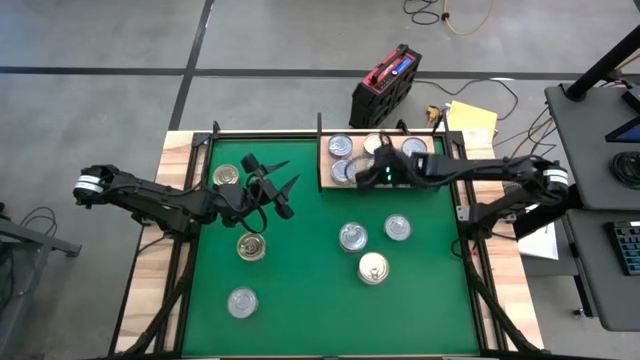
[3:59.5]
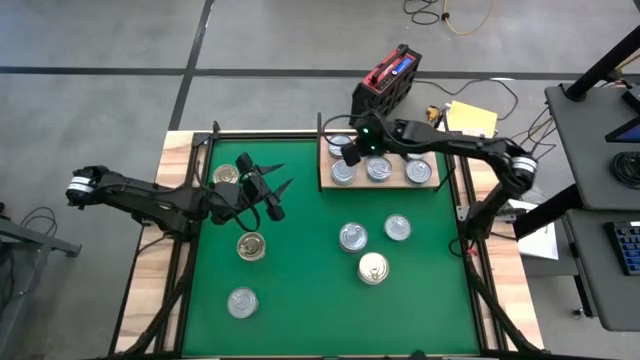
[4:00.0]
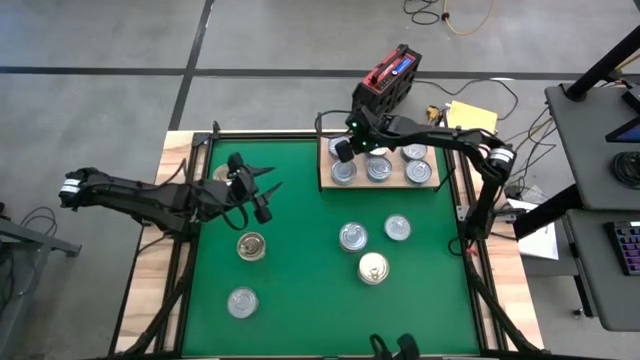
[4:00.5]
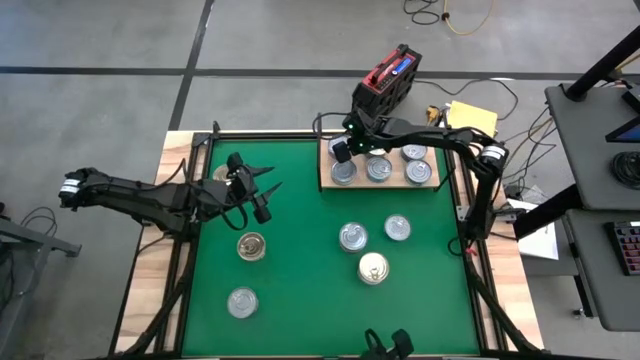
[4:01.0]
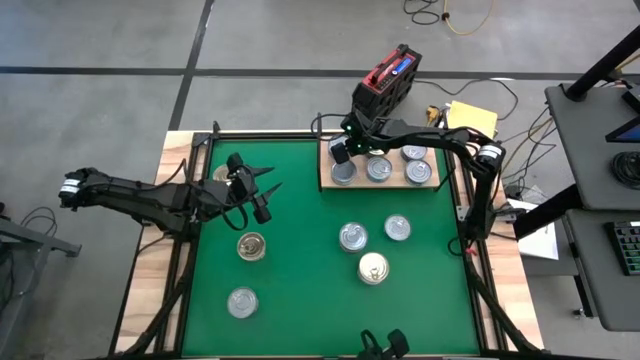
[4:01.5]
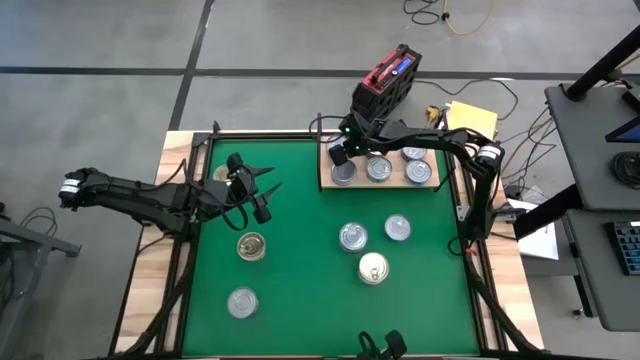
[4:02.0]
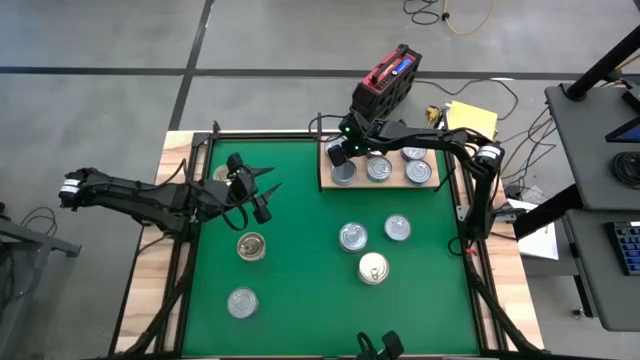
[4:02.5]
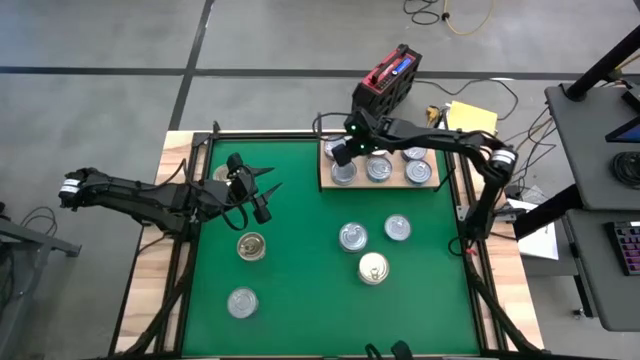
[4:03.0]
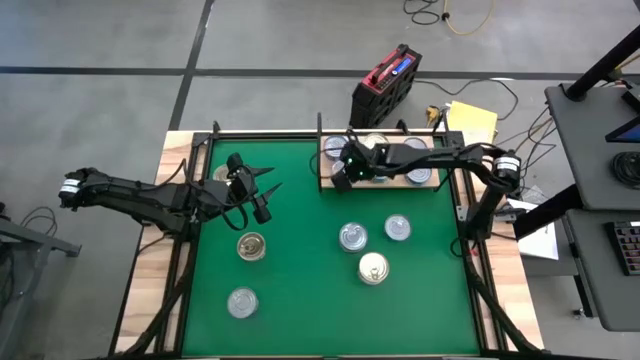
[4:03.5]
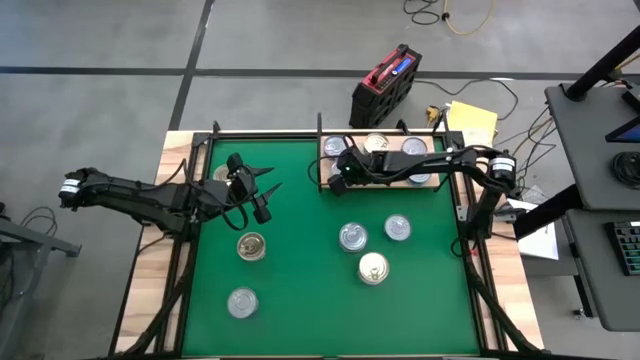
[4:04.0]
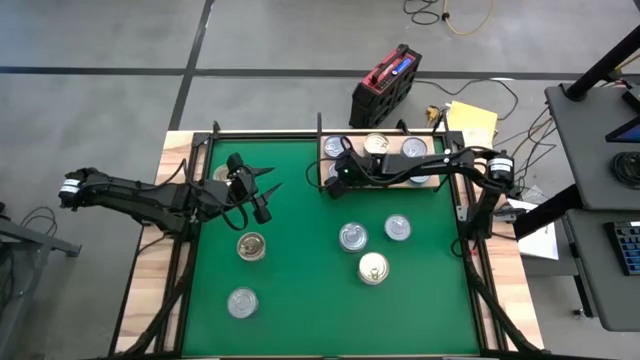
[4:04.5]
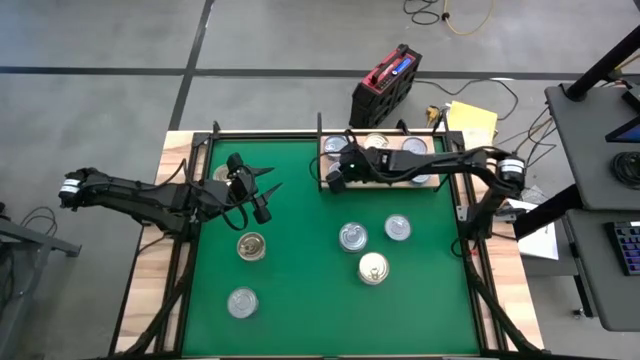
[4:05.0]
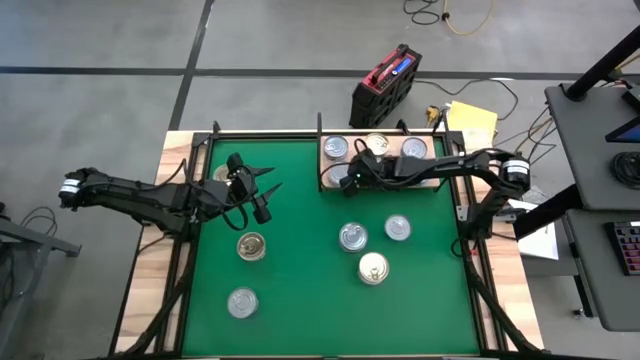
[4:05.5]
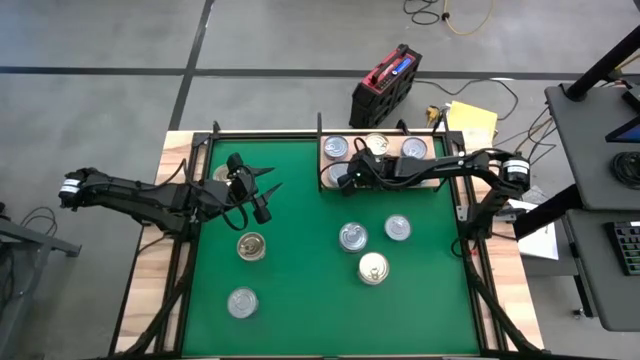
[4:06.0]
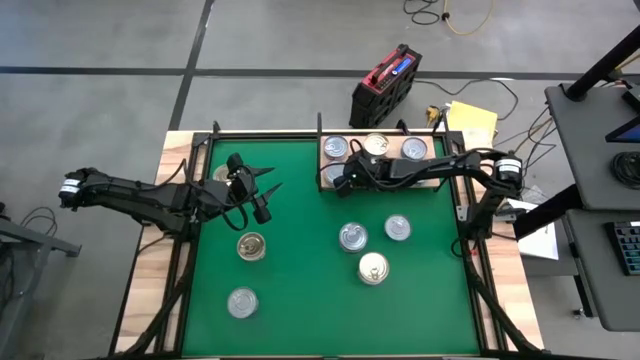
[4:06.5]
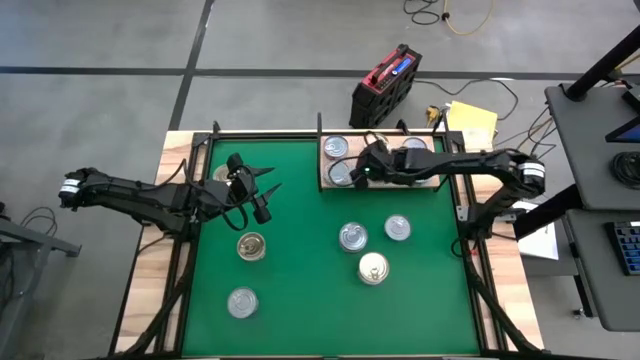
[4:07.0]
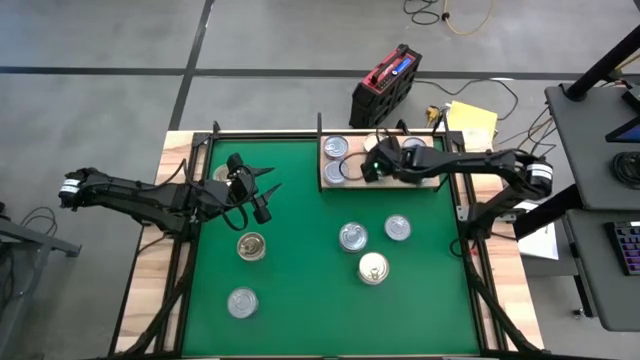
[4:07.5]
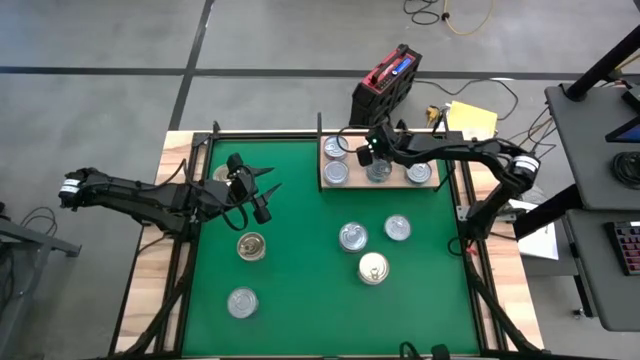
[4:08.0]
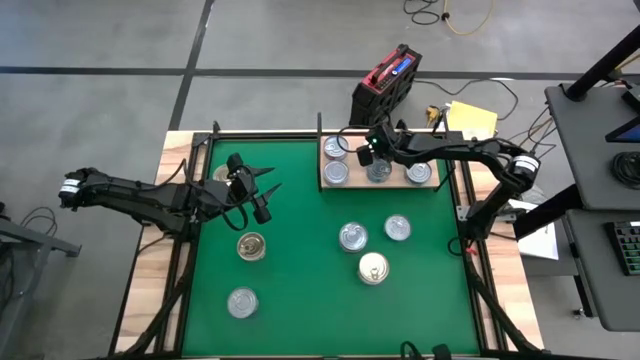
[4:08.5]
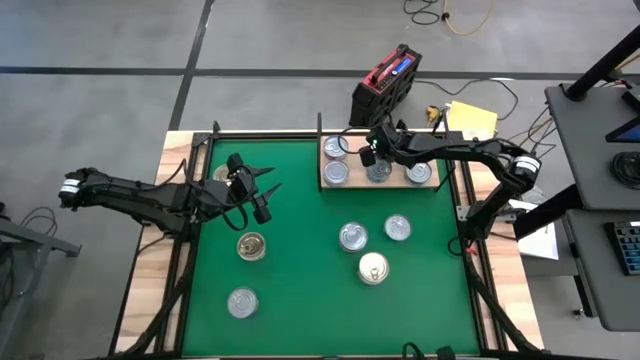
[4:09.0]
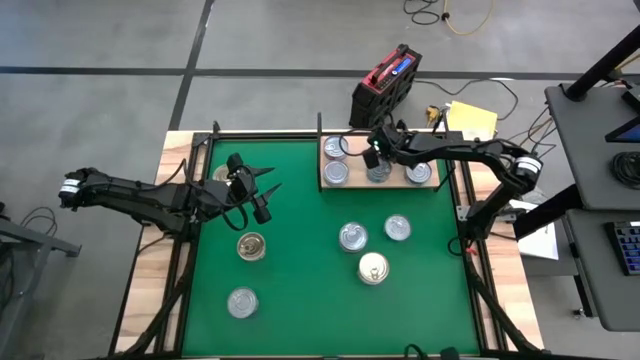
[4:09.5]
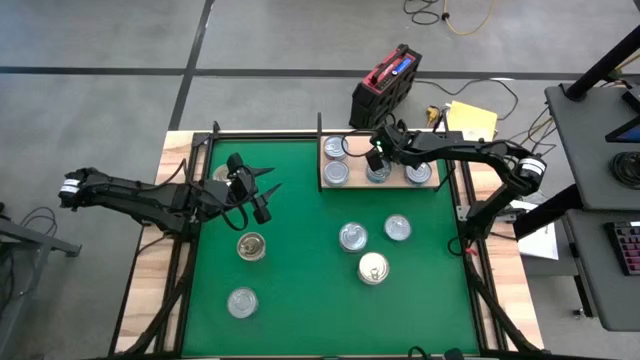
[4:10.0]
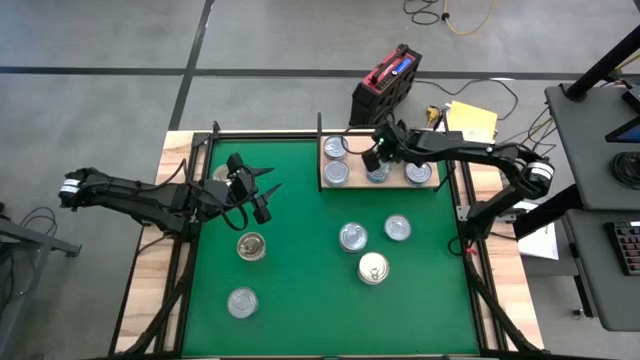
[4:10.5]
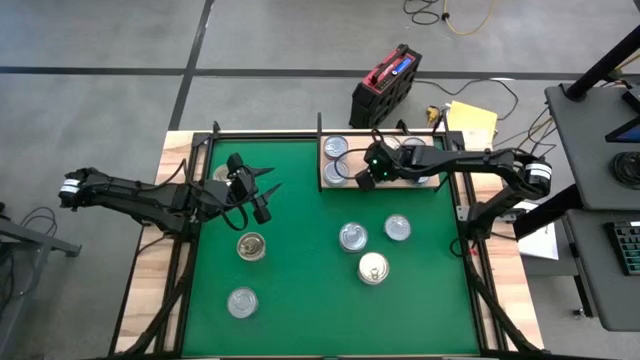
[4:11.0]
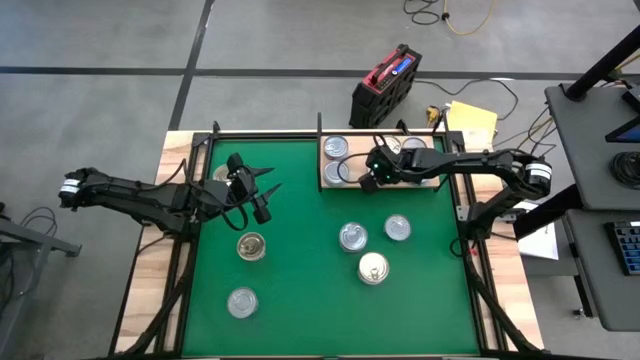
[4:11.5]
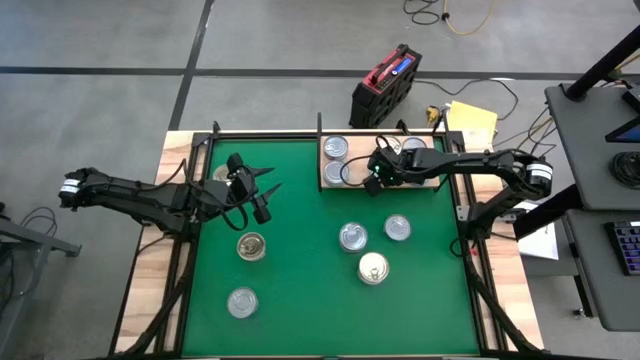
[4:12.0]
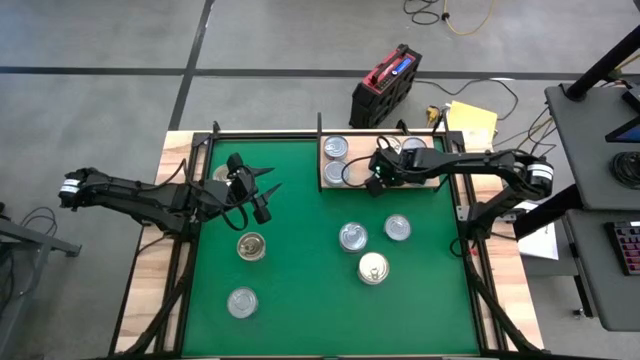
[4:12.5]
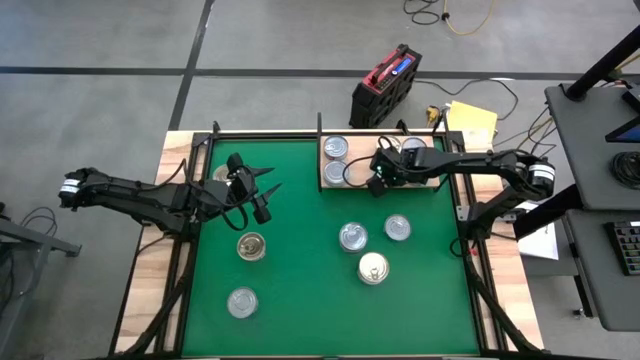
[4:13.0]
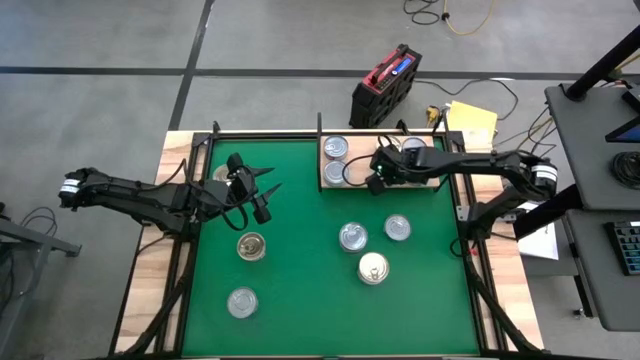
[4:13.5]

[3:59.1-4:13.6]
Task: Stack canned seafood by type on shelf
Adjust the tuna cans on the shelf

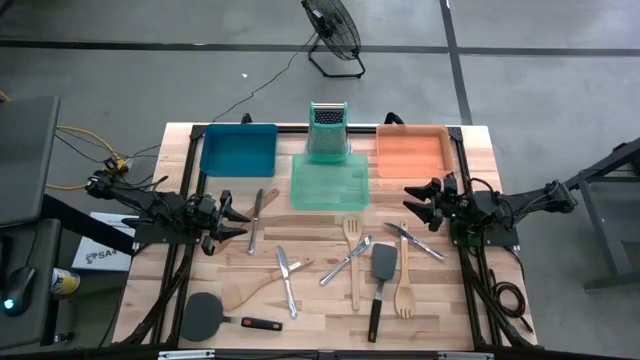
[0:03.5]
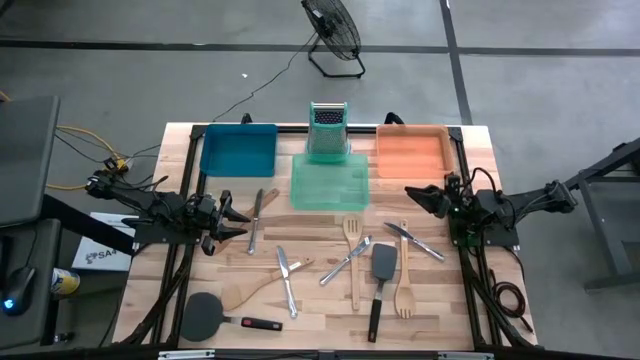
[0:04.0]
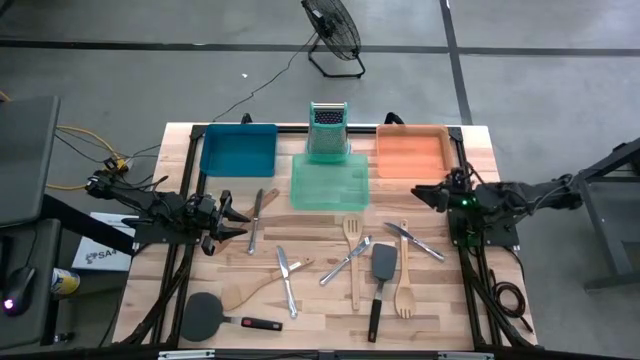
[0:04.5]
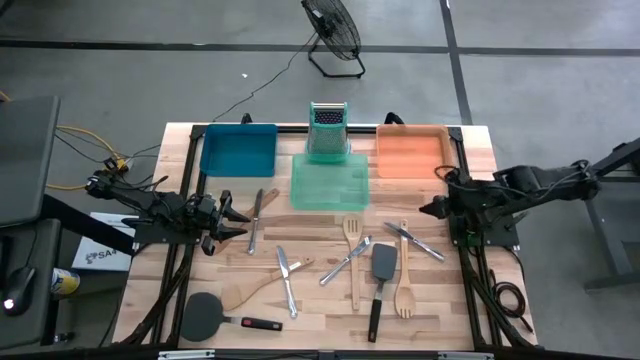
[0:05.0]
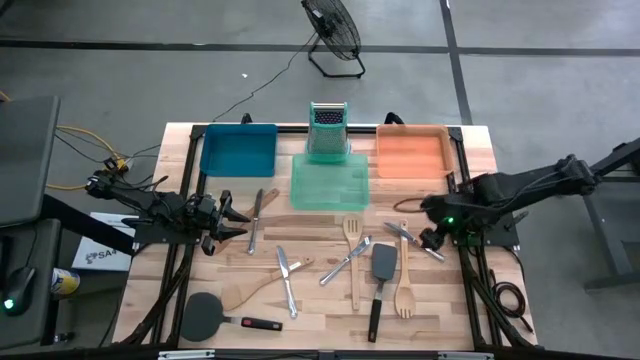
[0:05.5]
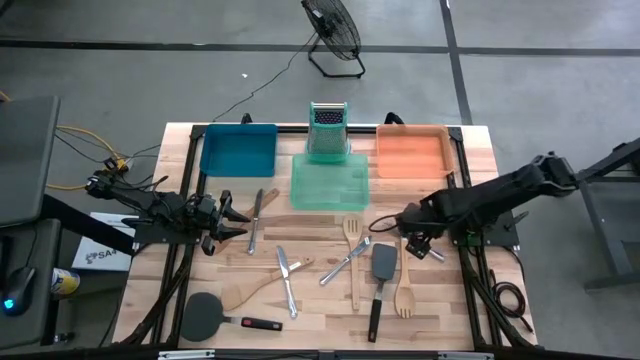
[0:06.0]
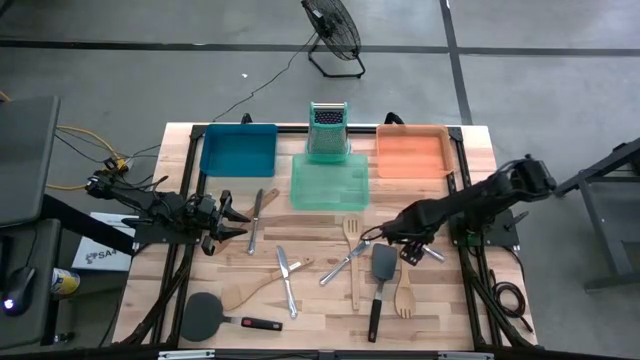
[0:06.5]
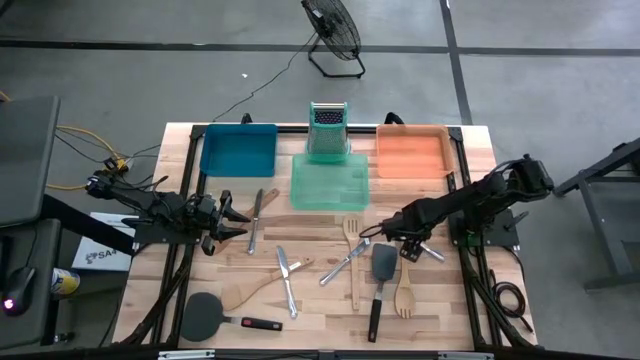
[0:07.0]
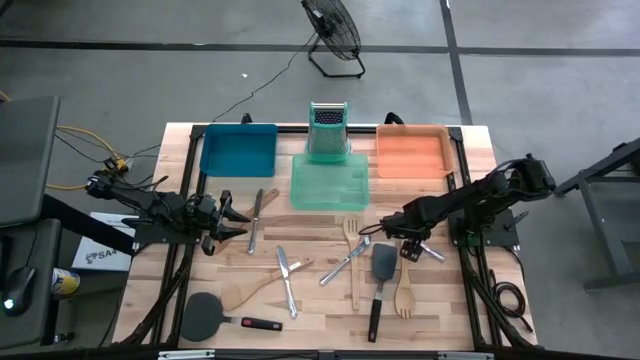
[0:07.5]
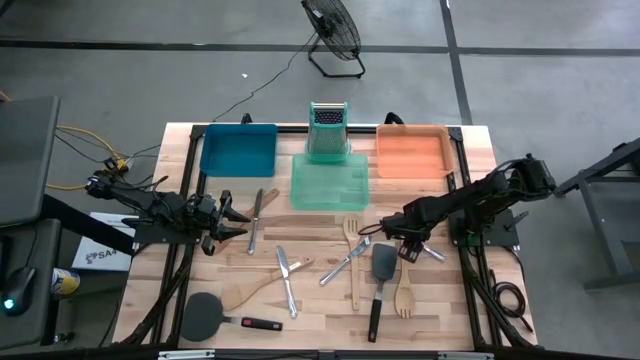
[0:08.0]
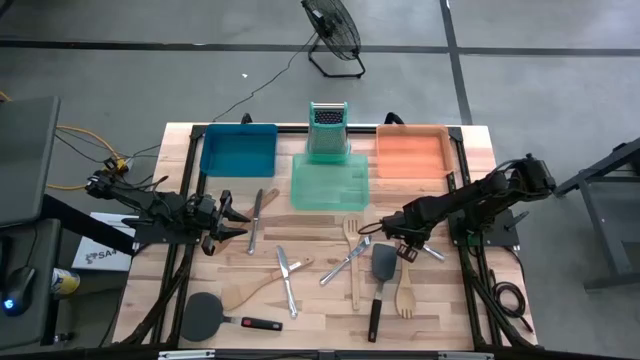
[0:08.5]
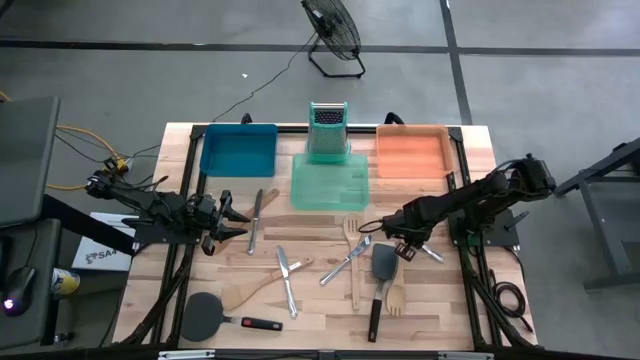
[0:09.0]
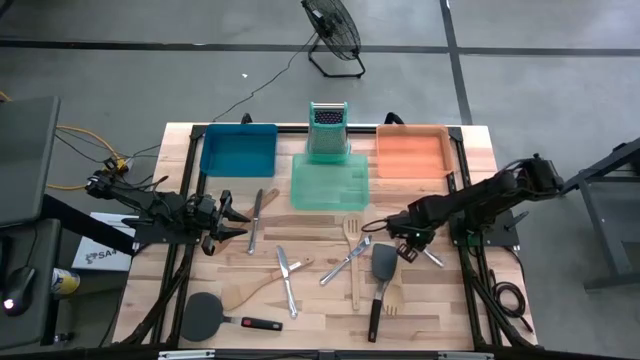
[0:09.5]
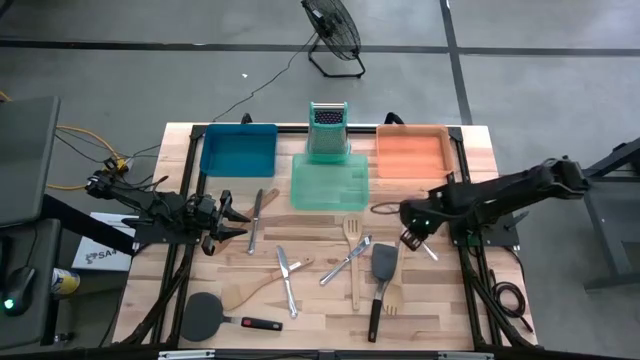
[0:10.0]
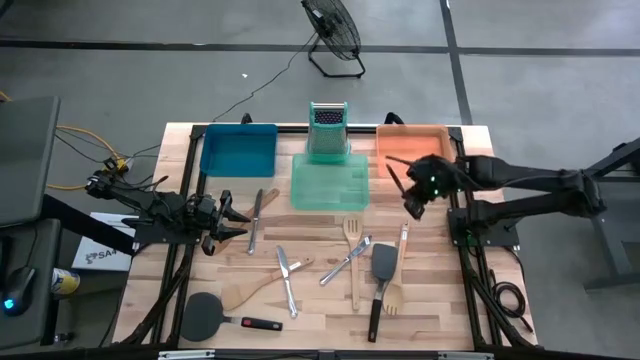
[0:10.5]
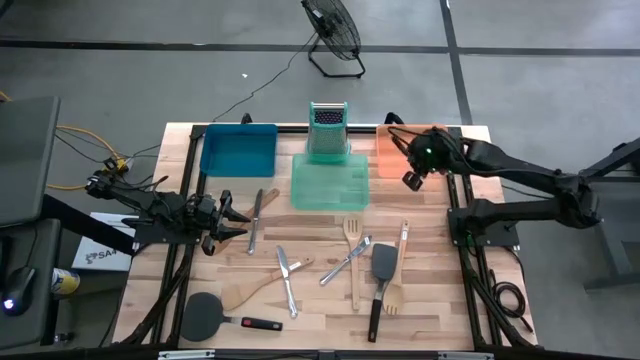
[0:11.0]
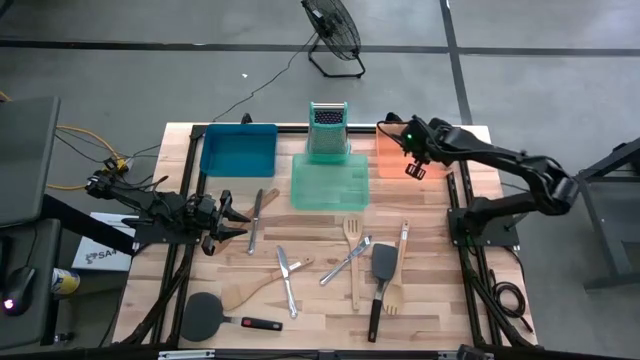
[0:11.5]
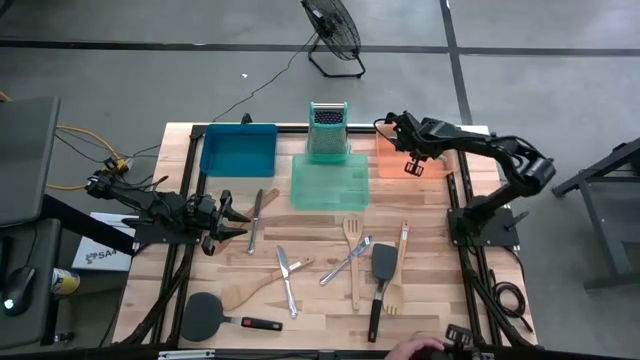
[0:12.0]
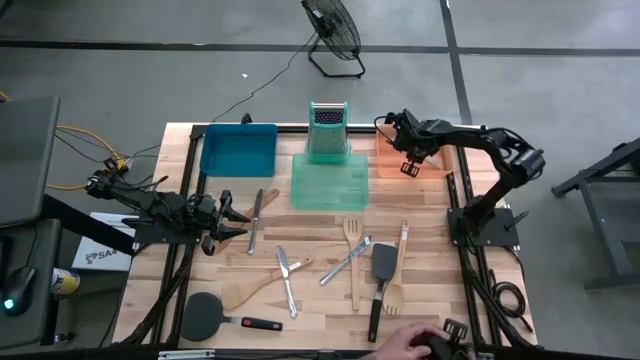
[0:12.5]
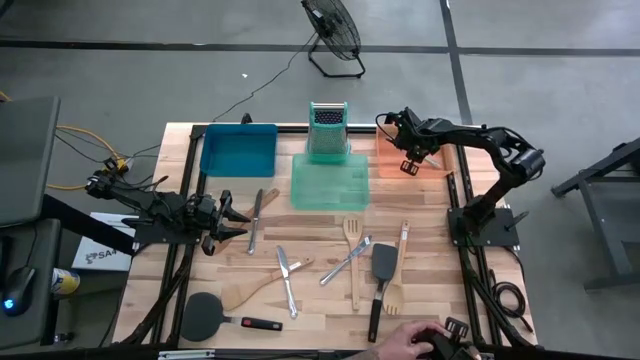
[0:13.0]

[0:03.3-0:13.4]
Task: Pick & Place Kitchen Items
Put the silver knife into the orange bin
